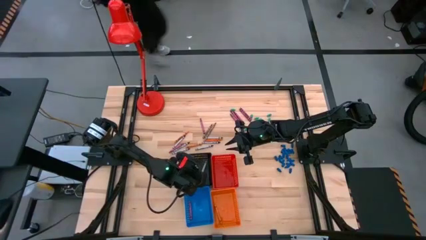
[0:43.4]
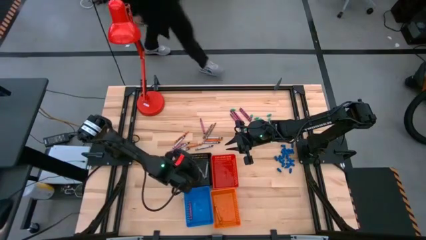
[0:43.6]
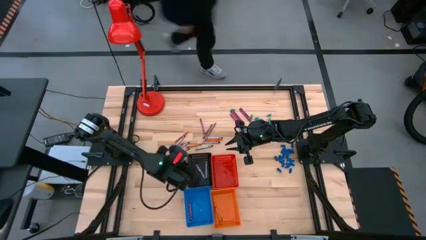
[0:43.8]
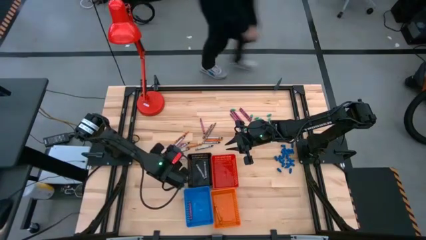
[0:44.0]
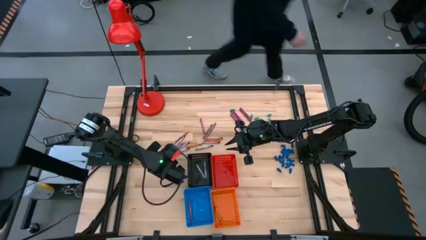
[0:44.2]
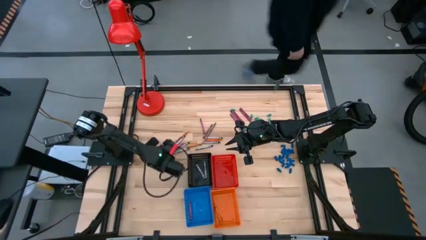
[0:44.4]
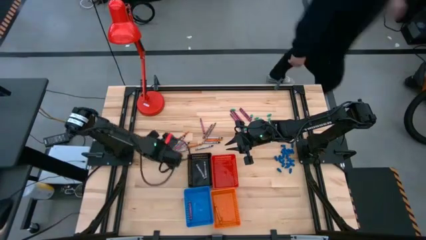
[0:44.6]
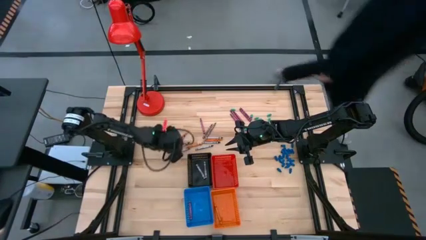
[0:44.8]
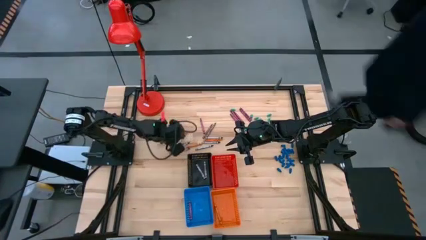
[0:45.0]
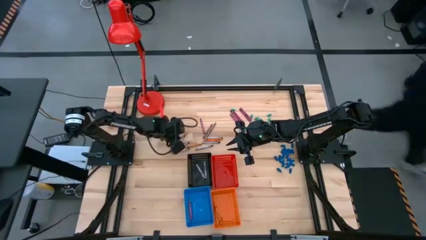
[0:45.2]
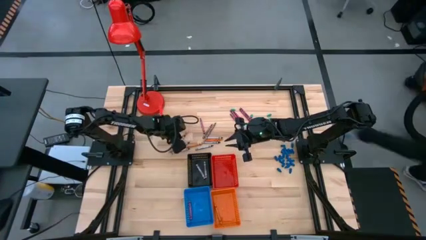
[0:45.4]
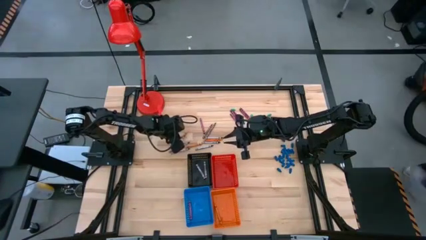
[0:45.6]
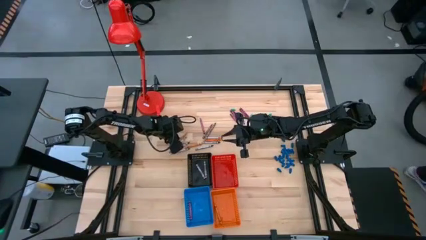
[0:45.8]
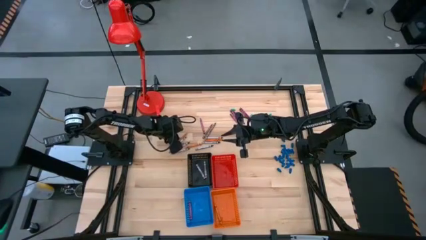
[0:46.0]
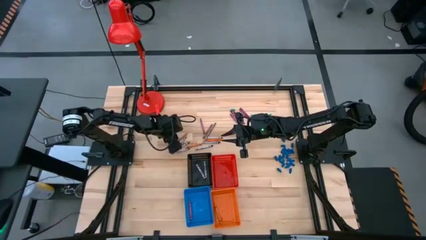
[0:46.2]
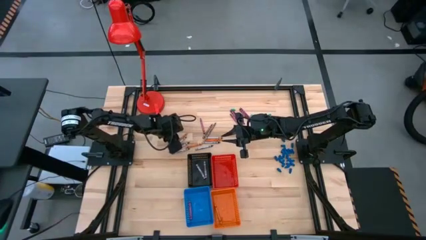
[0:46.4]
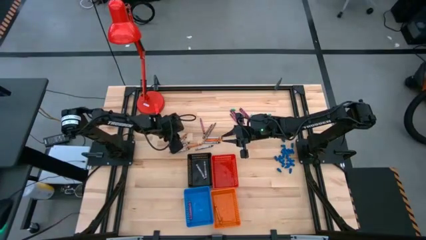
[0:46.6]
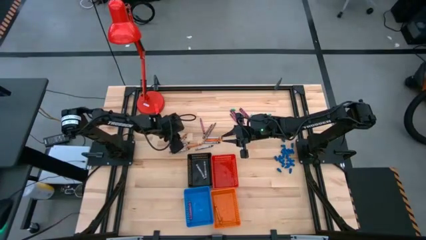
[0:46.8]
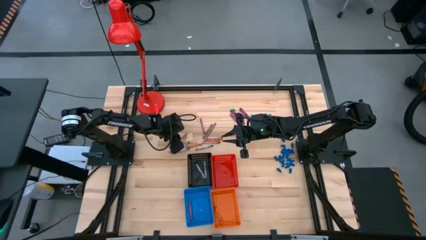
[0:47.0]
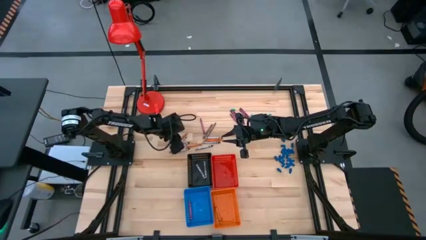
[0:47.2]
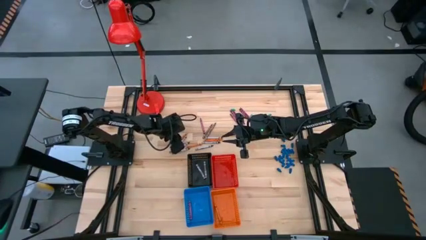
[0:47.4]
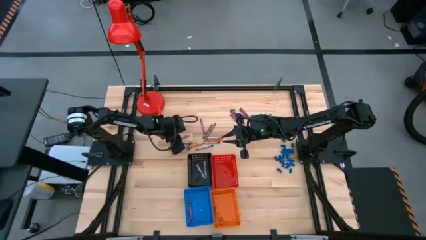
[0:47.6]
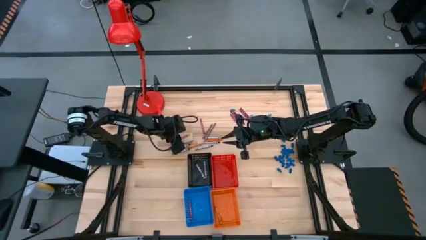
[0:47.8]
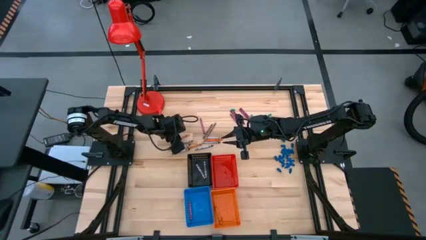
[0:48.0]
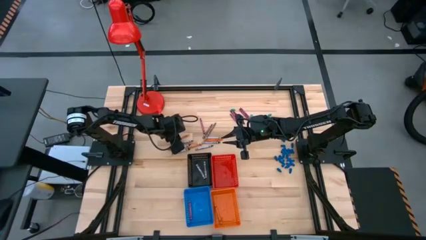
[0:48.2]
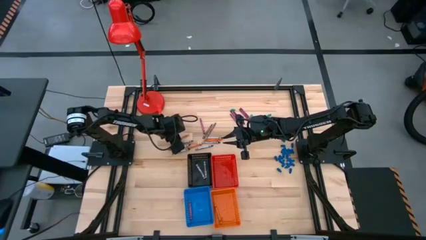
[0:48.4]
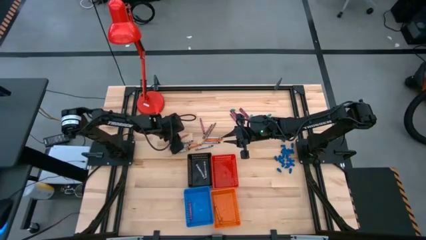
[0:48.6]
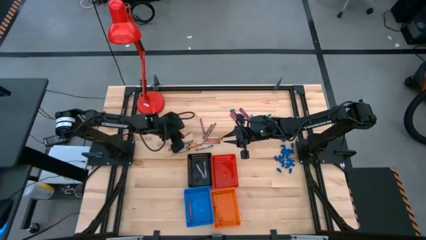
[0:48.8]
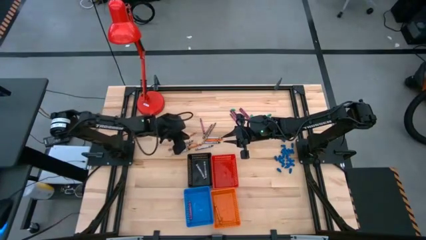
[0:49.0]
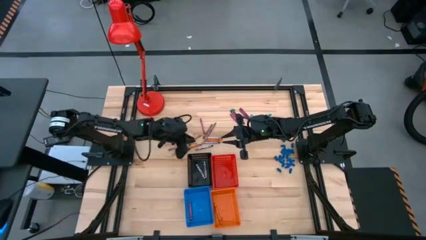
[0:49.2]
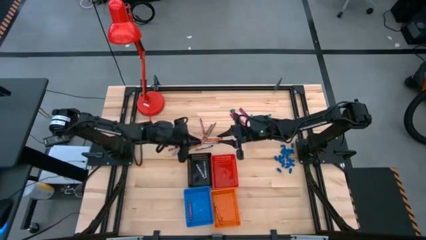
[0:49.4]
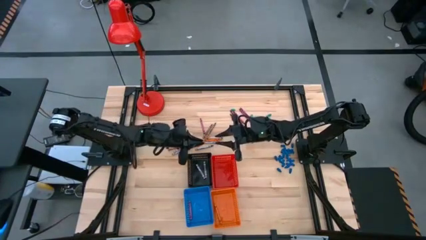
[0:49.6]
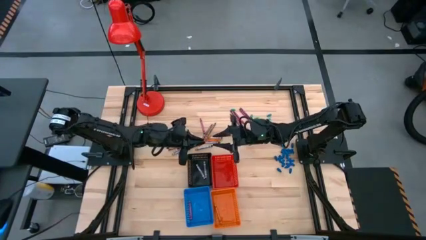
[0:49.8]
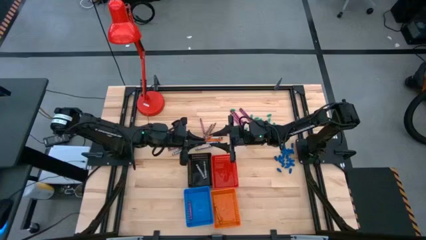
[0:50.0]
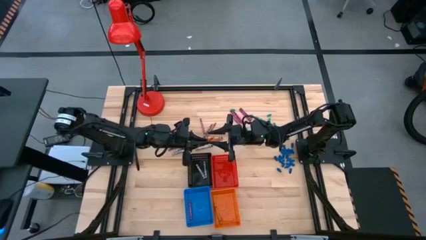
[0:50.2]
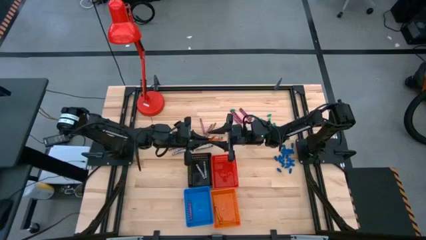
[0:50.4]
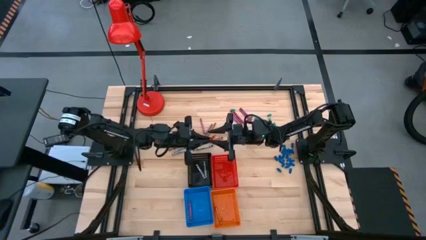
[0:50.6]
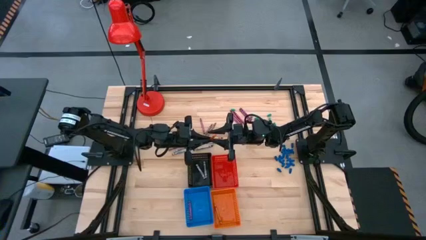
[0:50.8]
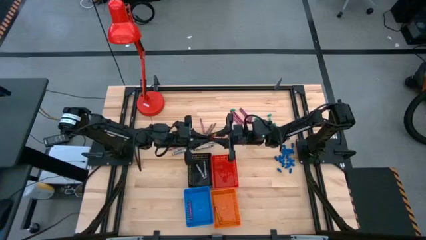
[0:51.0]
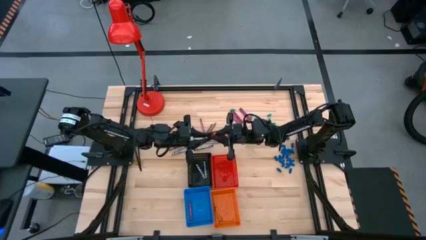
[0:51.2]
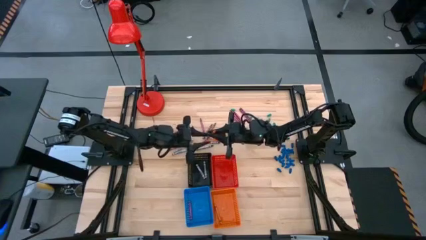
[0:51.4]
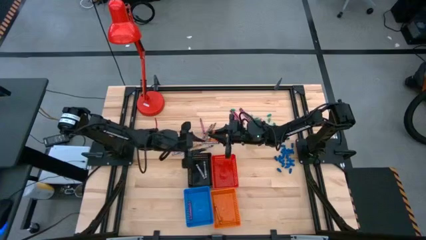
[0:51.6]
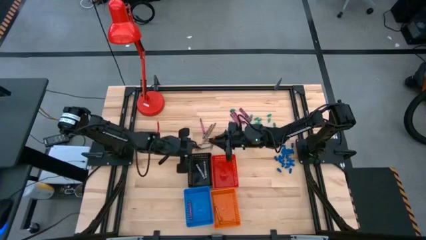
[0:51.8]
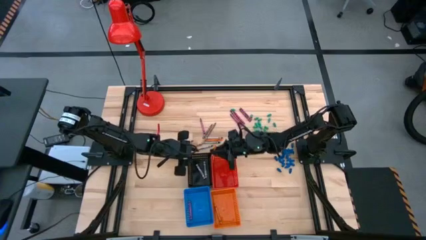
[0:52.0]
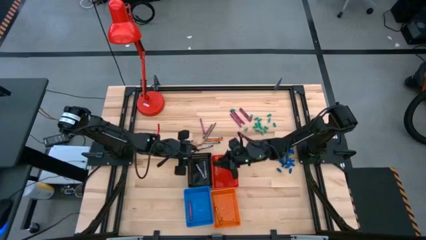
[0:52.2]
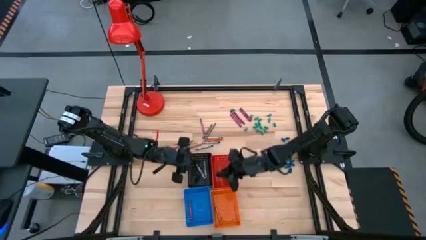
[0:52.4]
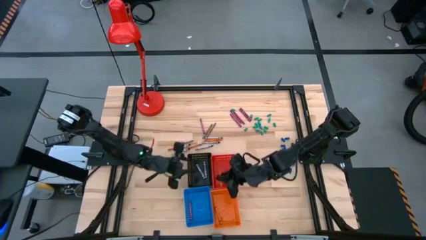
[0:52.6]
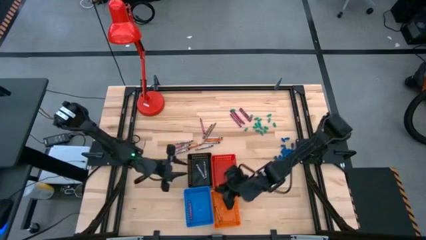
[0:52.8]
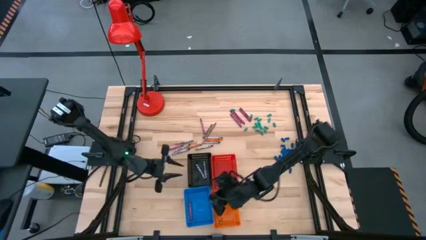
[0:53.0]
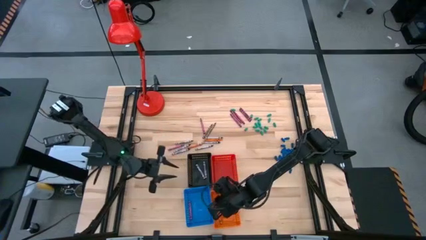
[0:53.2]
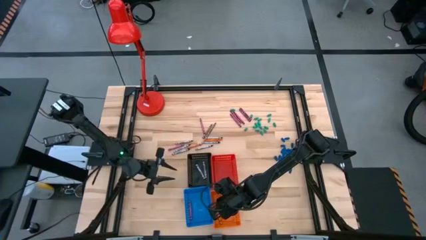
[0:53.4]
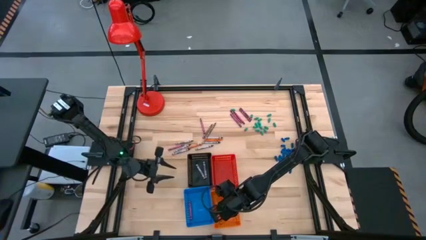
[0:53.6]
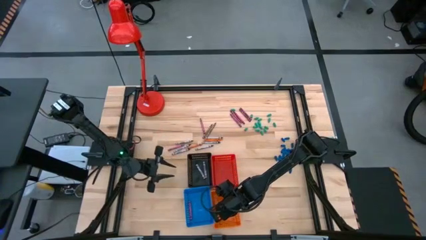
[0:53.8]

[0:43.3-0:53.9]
Task: Sort crayons
Put the orange crayon into the orange basket

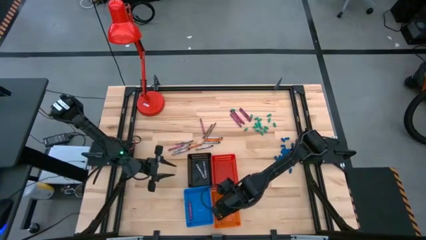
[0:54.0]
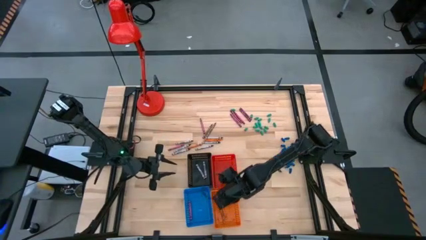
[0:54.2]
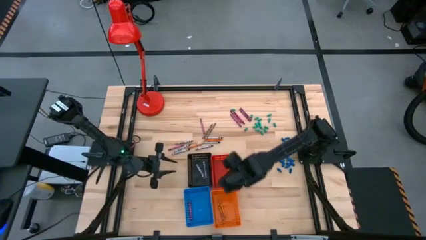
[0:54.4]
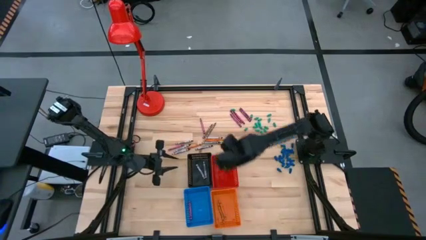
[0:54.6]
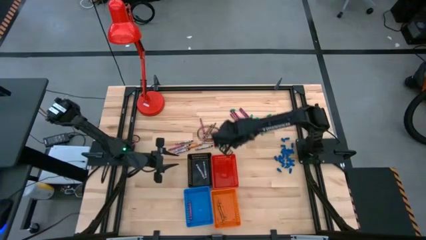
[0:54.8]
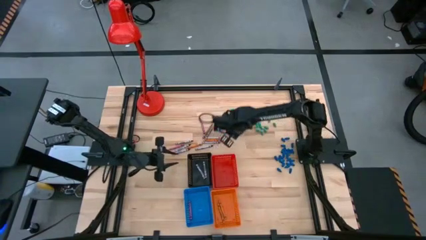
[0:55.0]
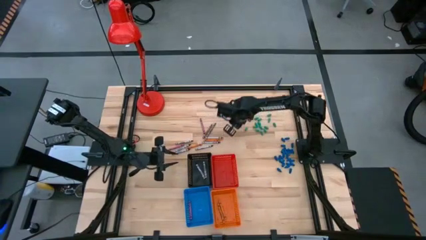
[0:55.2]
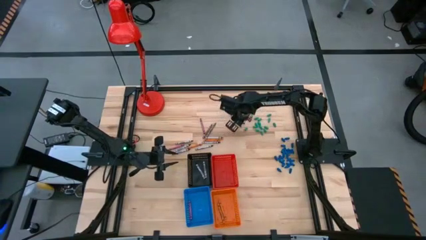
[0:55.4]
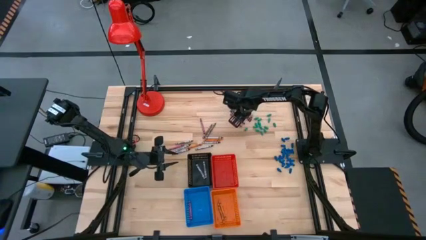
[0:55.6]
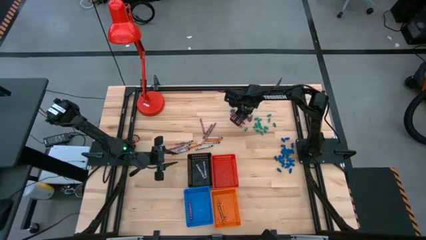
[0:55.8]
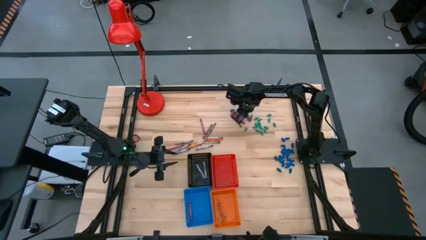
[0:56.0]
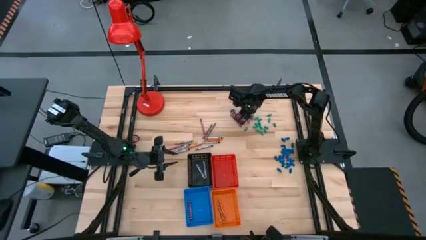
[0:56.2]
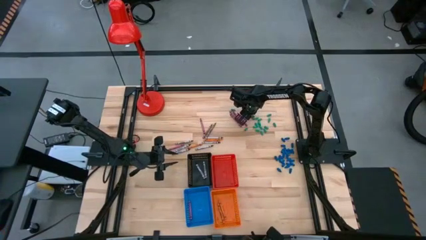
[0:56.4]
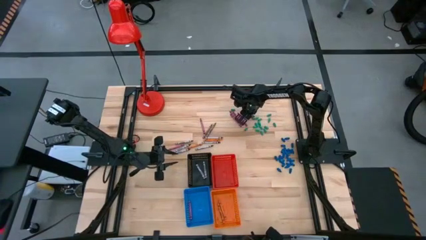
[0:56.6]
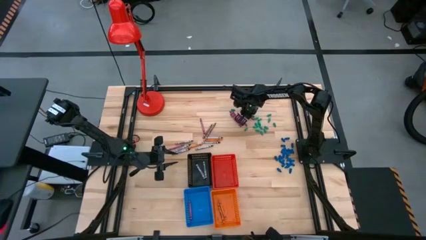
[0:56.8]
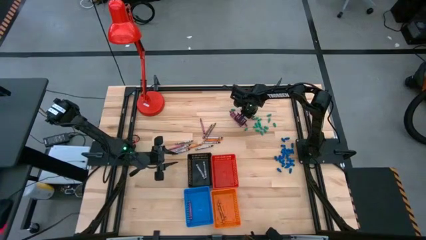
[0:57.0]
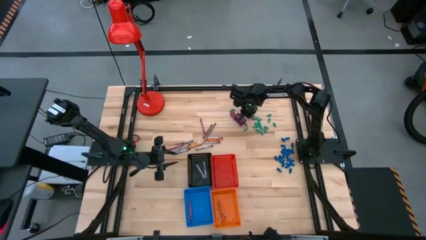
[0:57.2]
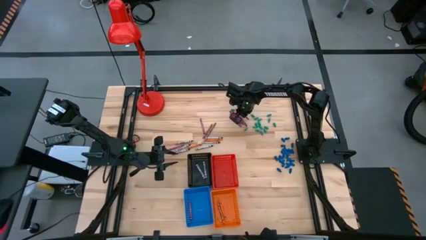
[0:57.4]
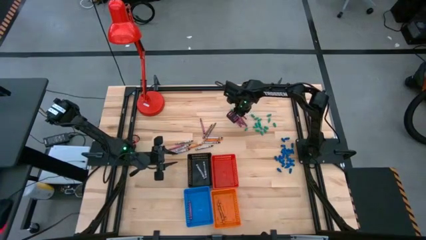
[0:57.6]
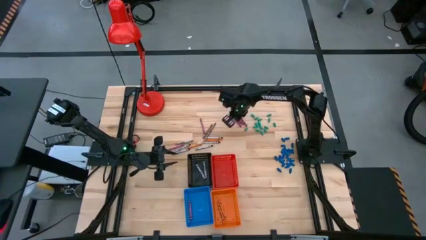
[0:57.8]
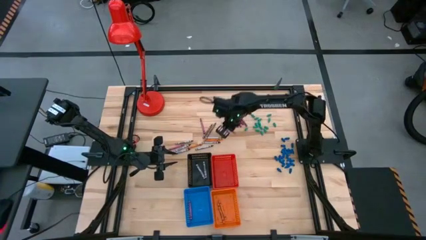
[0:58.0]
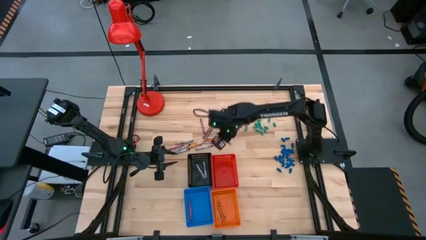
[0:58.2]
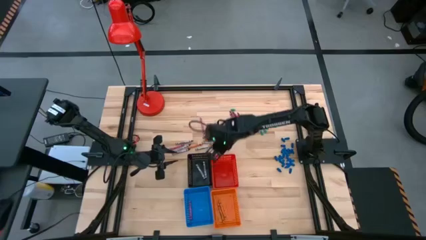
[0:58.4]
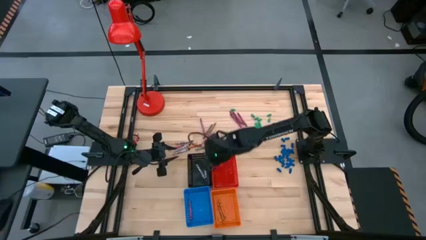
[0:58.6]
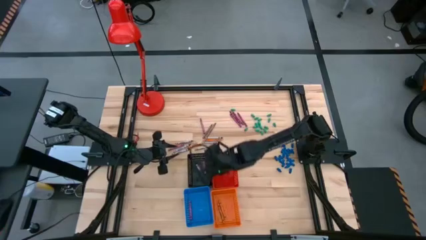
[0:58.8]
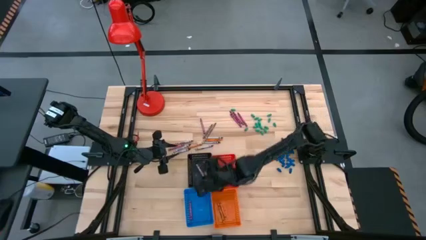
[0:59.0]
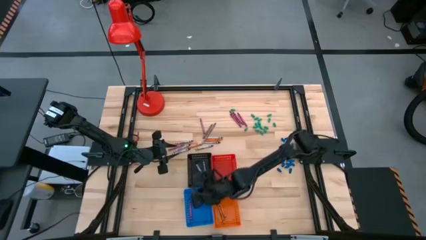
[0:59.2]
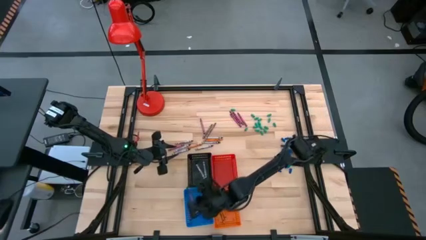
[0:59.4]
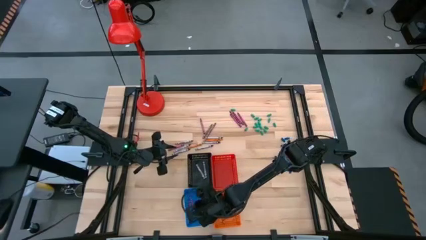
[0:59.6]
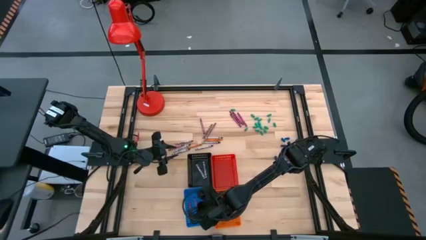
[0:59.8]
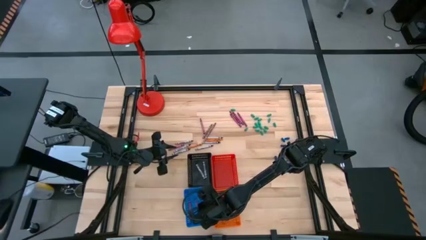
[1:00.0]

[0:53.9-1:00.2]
Put the red crayon into the blue basket
